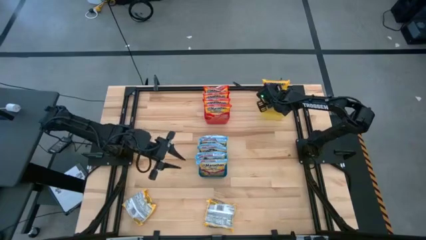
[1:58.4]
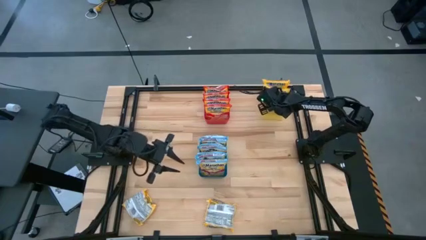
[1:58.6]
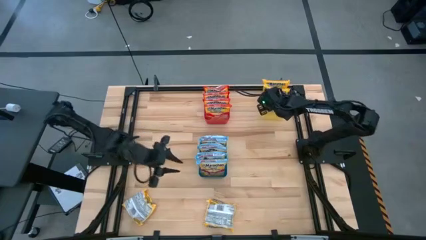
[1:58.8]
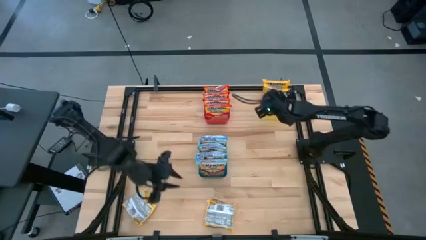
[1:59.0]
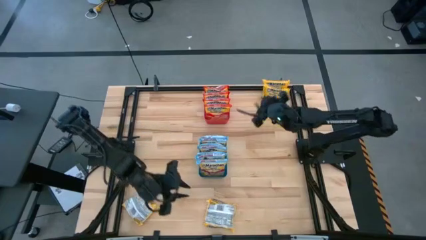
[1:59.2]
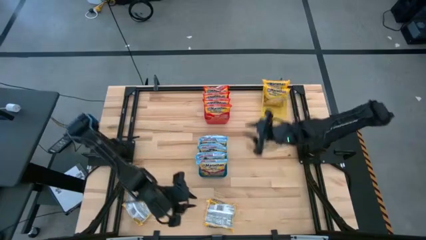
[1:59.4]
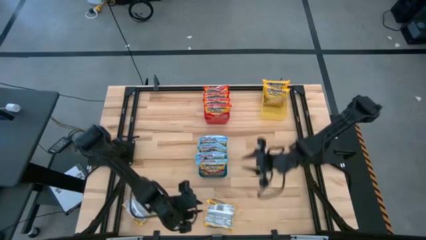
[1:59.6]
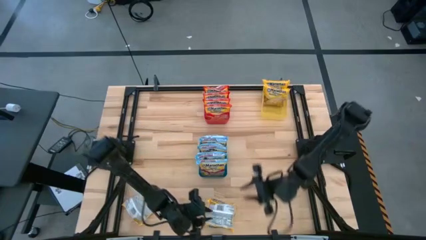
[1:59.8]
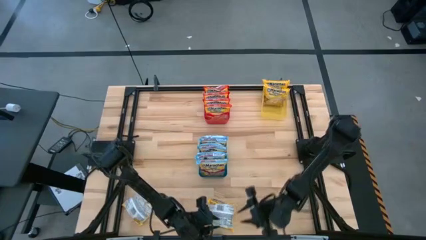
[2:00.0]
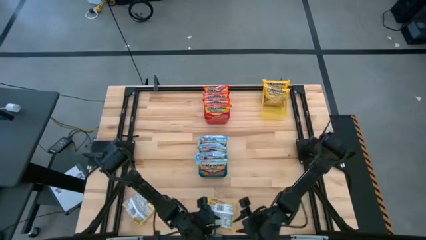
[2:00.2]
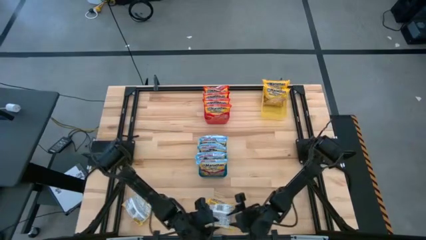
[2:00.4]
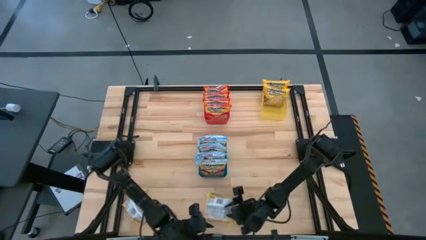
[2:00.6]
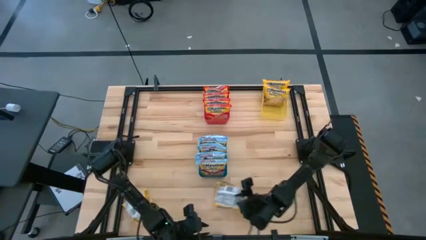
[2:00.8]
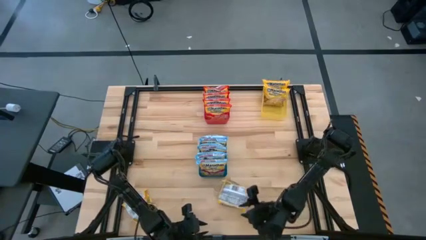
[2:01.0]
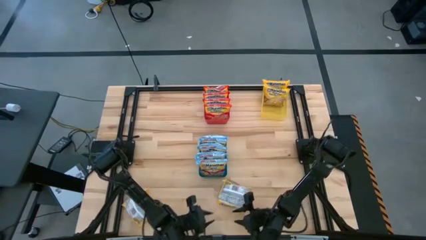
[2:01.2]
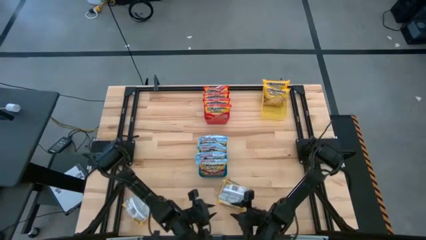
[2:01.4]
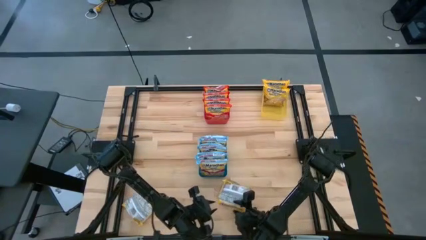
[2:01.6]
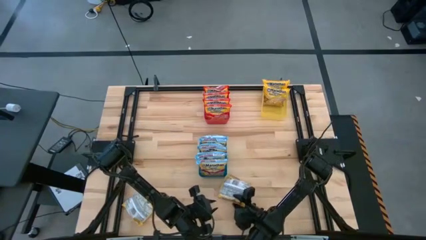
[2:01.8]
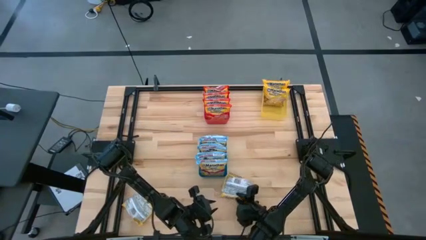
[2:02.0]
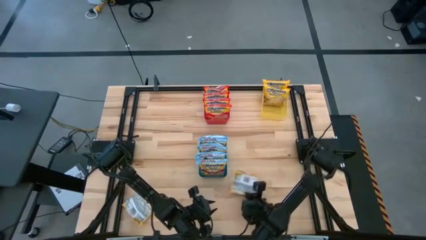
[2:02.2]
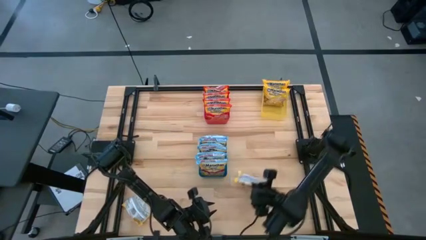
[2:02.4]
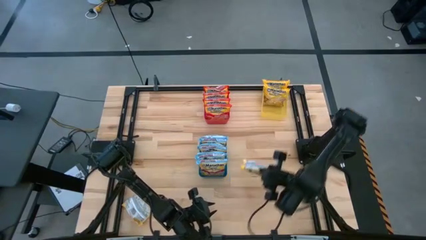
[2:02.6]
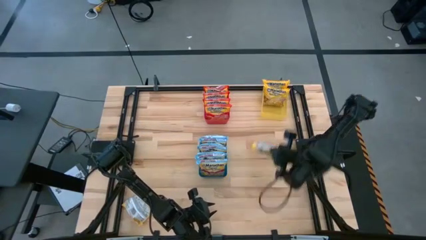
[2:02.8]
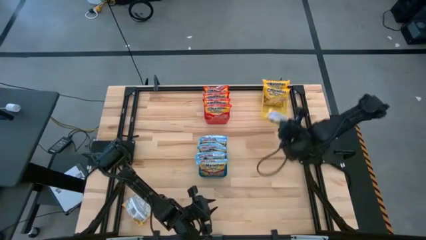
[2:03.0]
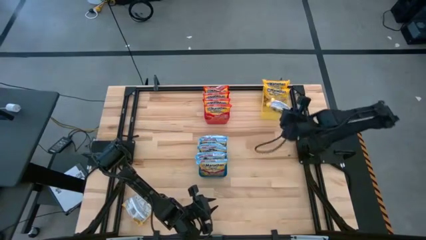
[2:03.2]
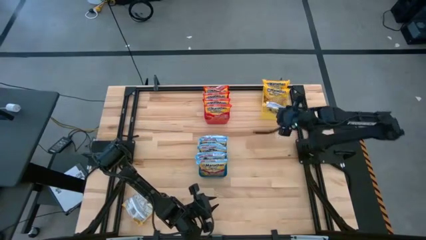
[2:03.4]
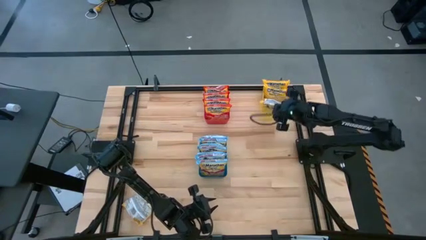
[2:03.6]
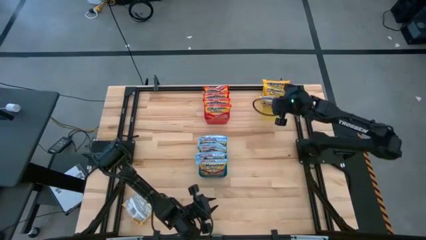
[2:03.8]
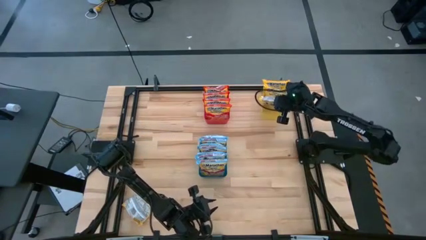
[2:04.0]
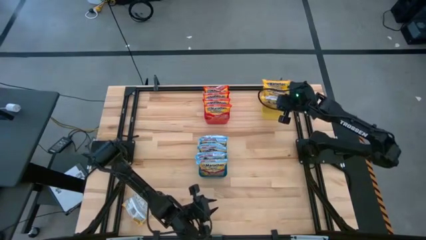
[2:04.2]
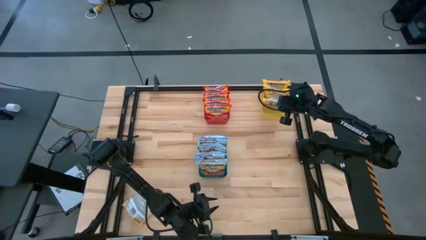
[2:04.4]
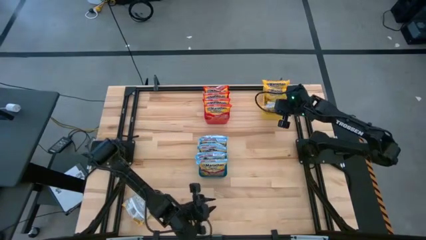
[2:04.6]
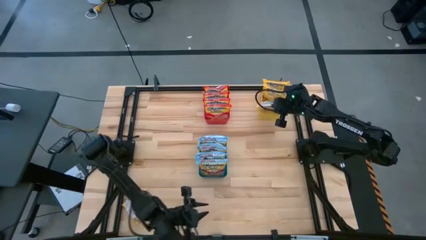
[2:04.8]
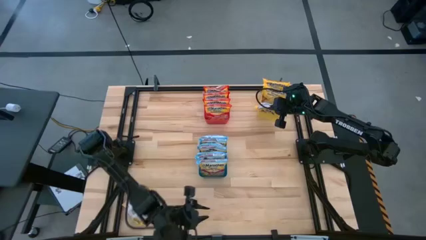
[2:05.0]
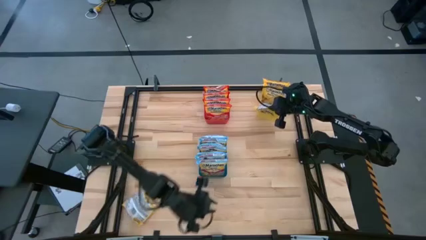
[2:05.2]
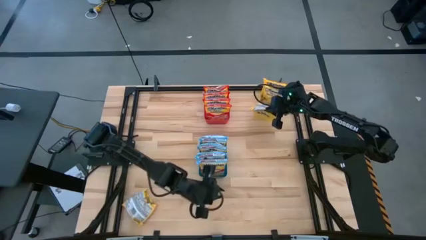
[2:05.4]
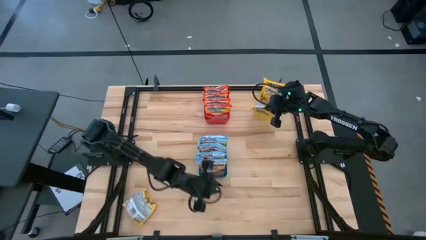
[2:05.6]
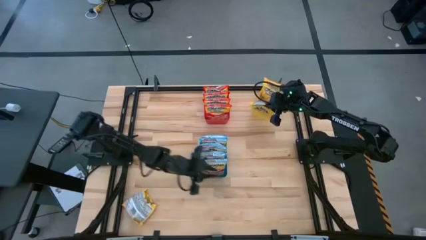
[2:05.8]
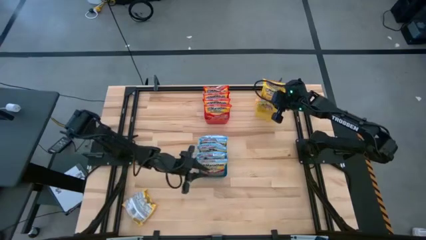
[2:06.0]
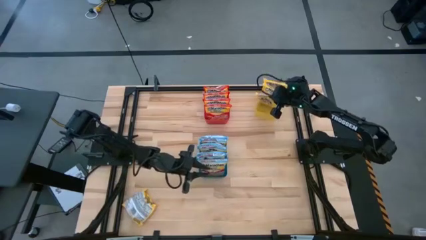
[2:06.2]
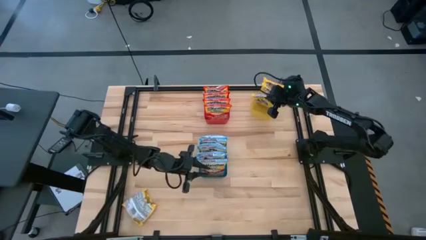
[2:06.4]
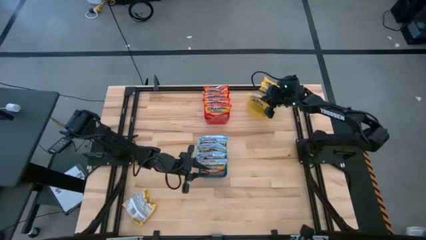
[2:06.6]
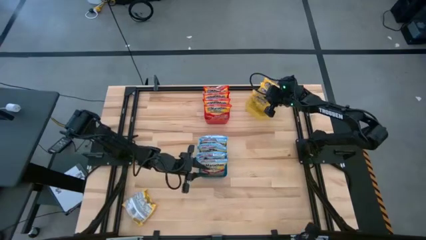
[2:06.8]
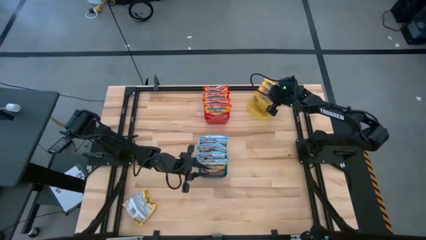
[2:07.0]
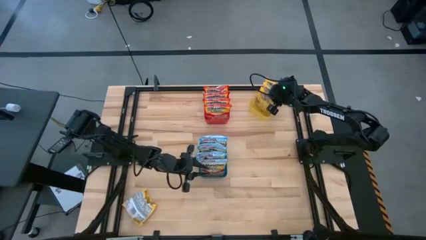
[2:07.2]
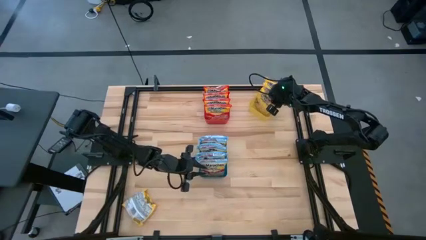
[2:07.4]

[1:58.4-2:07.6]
Task: Sort Maruchan noodles
Put the yellow noodle pack into the yellow bin

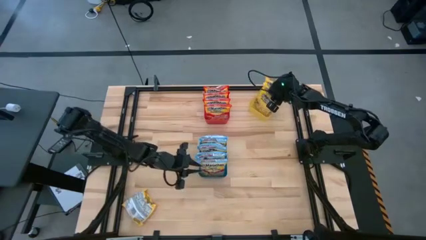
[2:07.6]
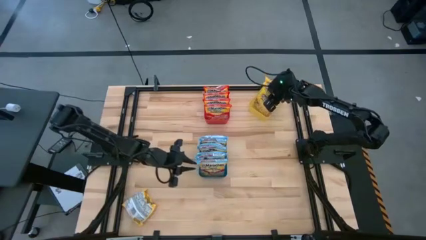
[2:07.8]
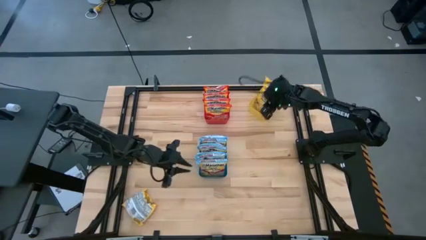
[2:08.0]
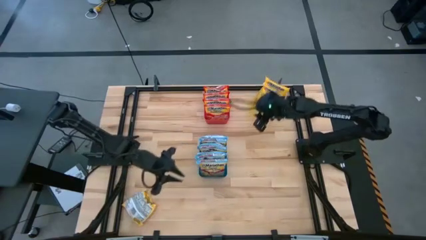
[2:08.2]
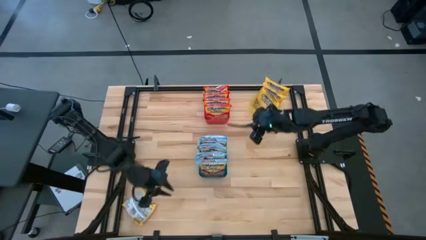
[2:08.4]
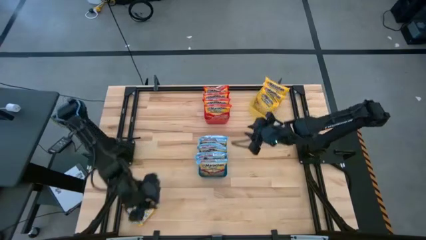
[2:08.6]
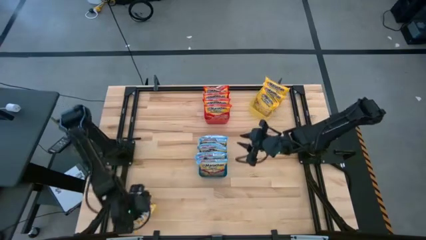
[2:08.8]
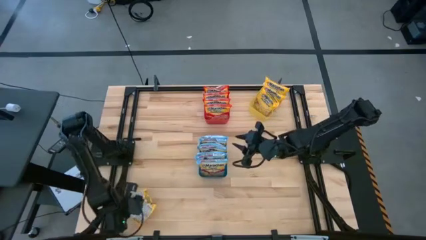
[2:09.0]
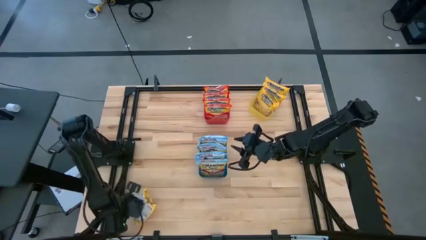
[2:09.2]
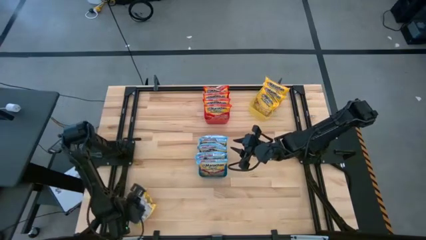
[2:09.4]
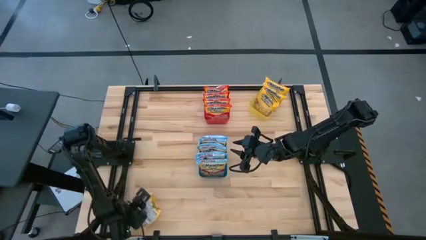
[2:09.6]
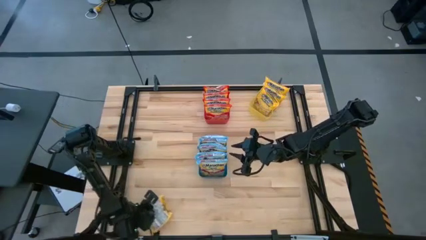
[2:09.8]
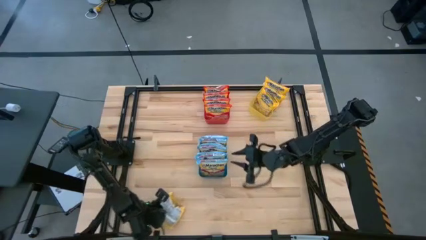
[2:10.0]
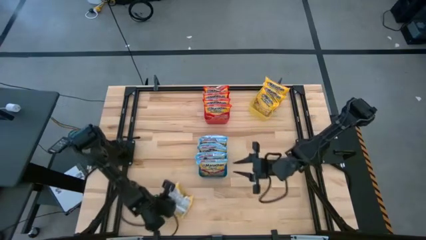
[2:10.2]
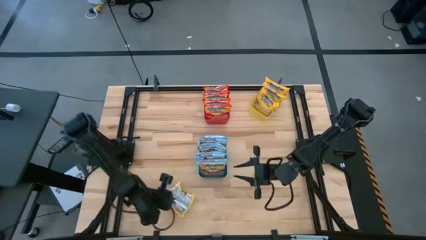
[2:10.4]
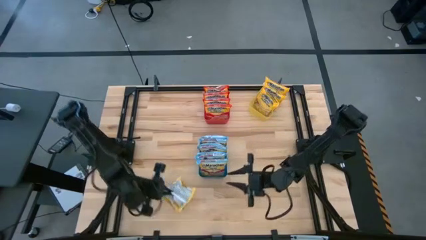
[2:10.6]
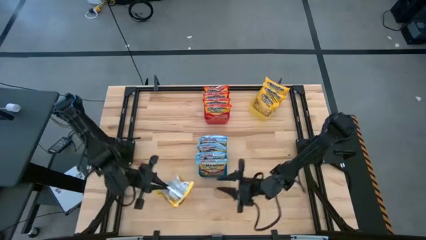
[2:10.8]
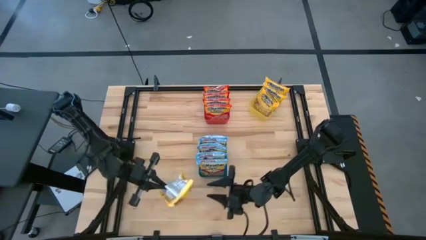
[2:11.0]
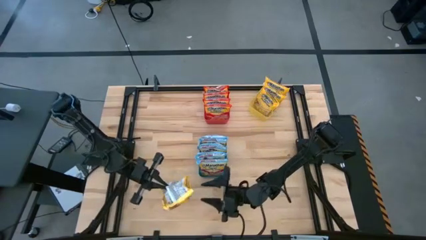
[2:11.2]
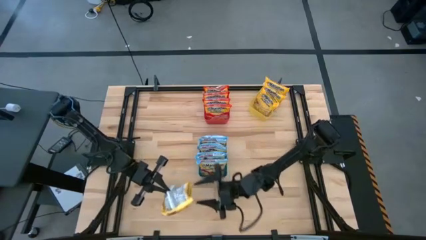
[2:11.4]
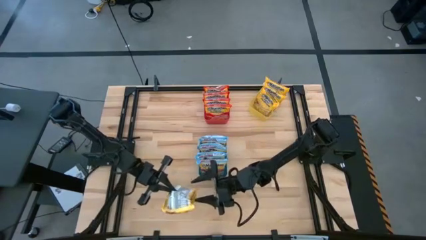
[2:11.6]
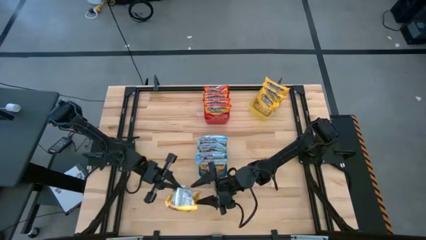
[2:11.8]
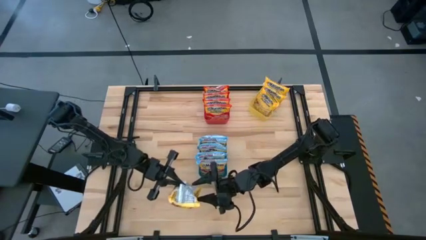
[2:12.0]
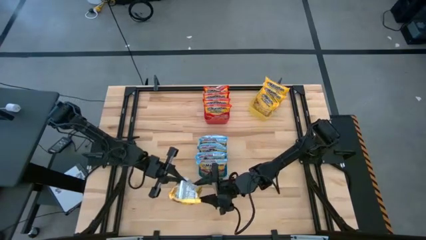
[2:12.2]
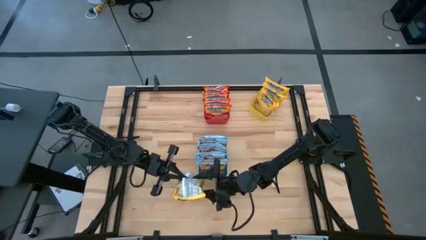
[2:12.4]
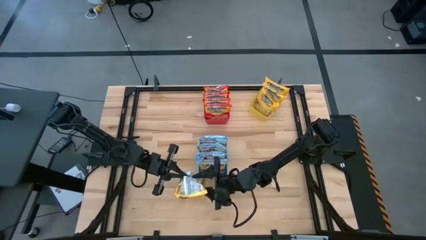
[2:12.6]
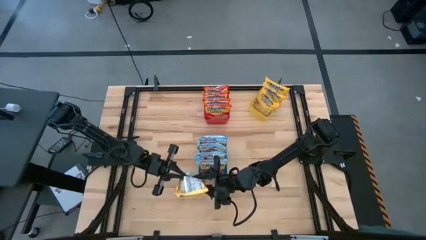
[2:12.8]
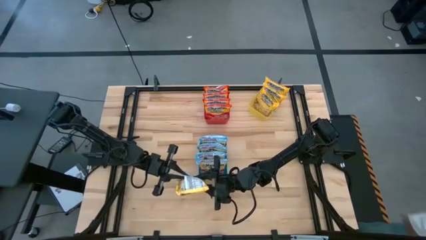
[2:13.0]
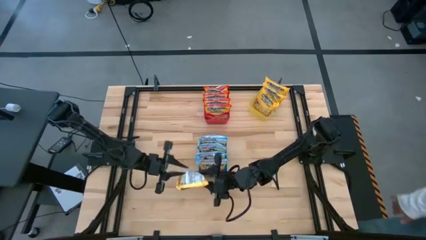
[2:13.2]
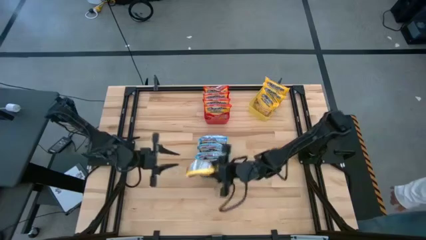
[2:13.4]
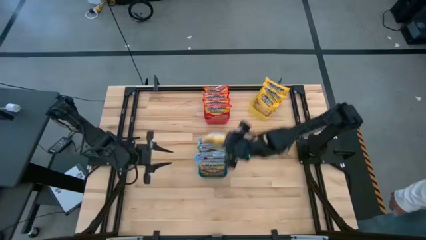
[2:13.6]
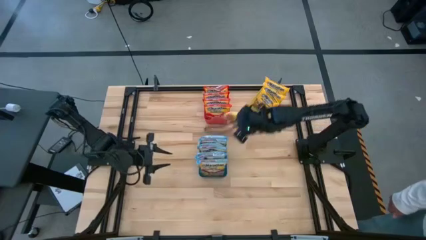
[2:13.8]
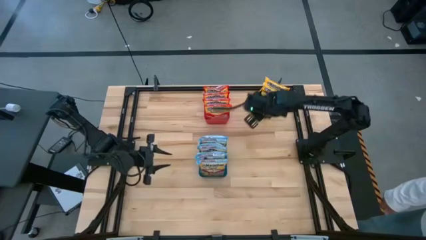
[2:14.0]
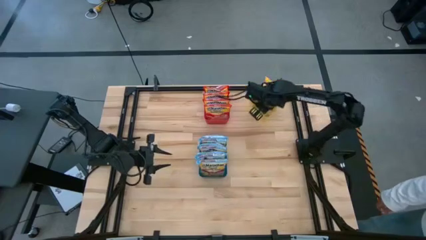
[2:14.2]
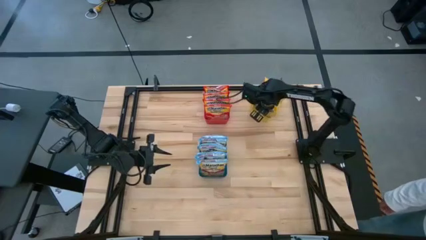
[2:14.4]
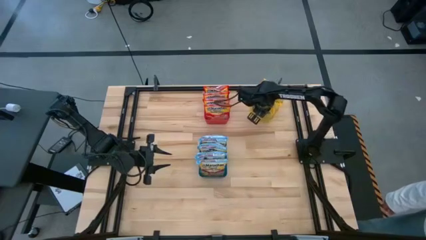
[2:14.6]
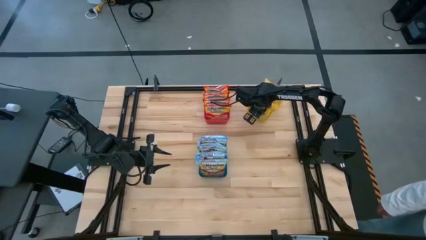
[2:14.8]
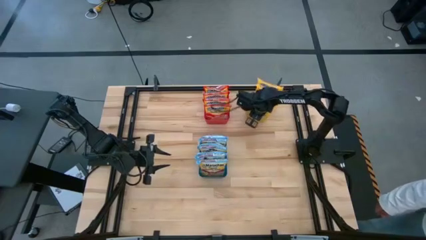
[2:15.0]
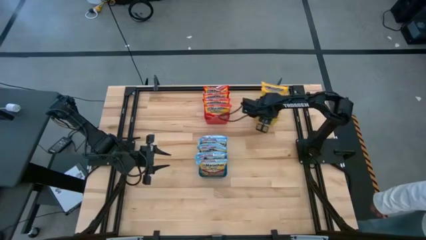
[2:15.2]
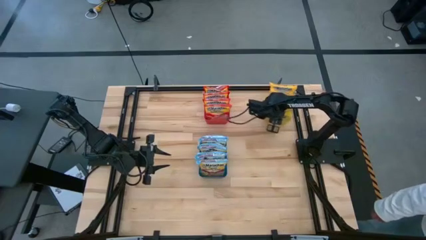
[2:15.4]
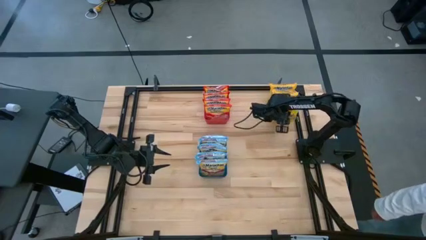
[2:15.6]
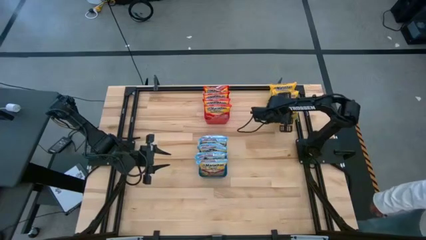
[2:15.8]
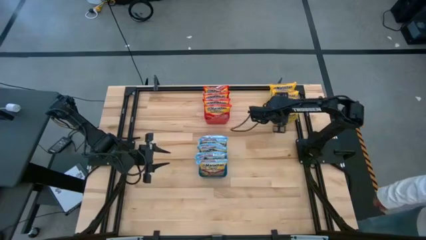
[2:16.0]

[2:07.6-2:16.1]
Put the yellow noodle pack into the yellow bin
